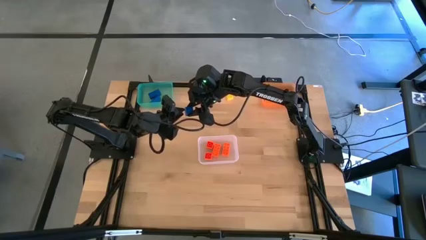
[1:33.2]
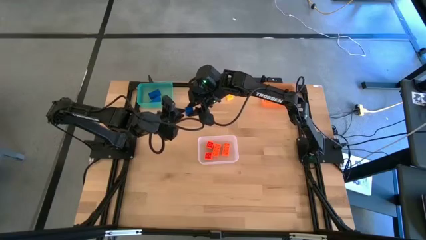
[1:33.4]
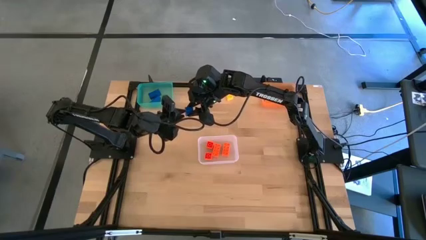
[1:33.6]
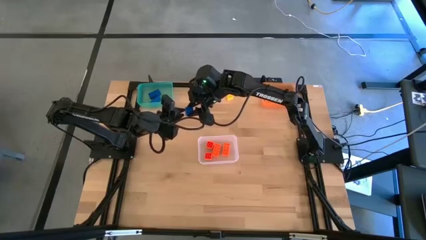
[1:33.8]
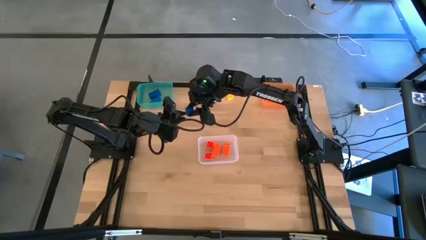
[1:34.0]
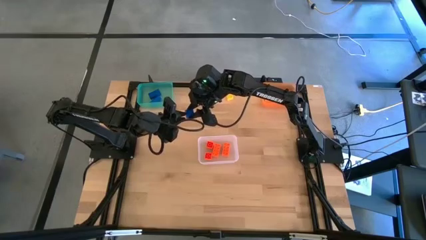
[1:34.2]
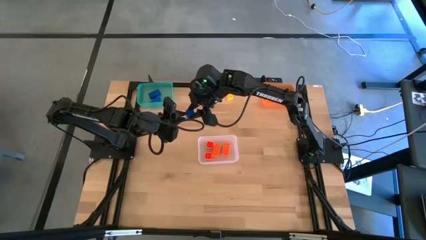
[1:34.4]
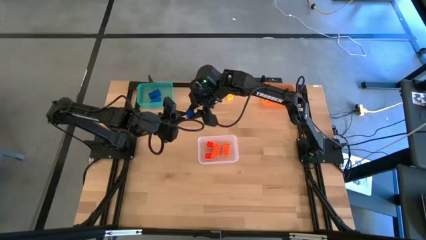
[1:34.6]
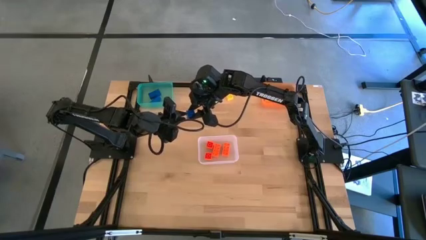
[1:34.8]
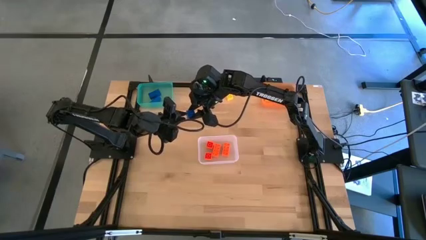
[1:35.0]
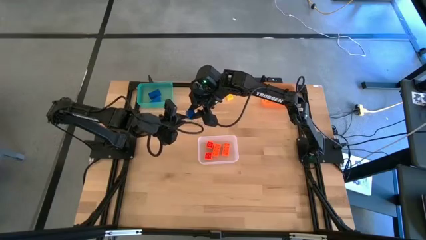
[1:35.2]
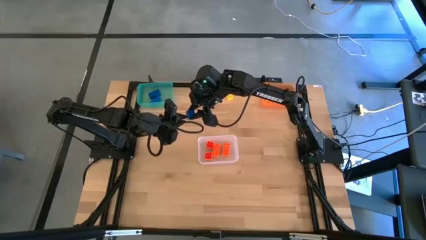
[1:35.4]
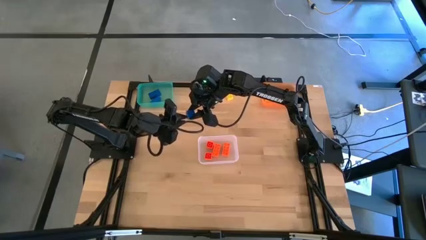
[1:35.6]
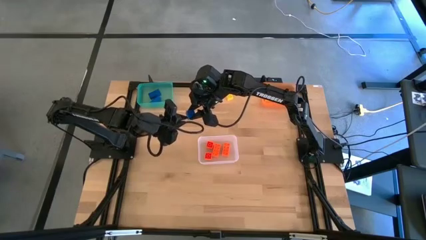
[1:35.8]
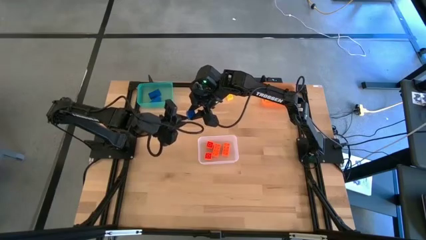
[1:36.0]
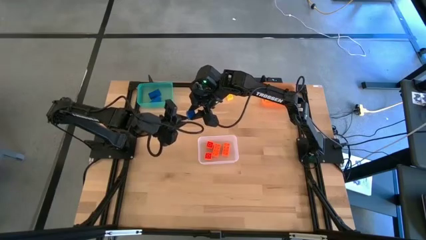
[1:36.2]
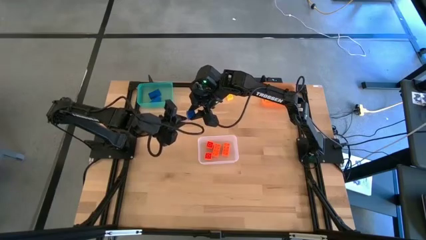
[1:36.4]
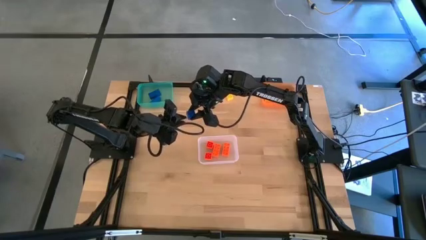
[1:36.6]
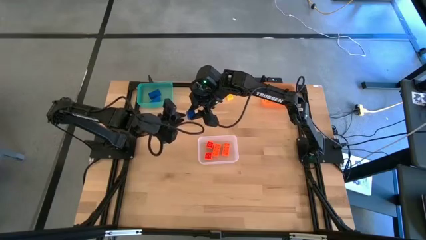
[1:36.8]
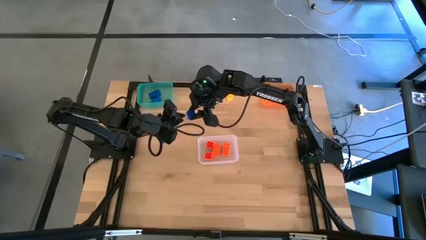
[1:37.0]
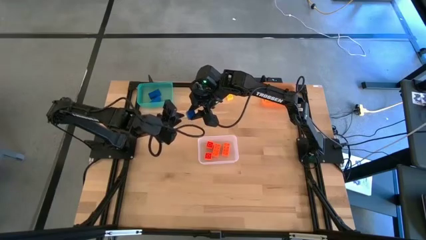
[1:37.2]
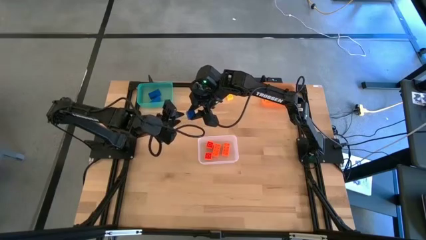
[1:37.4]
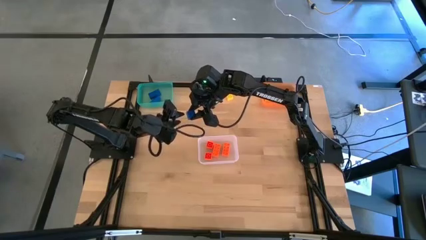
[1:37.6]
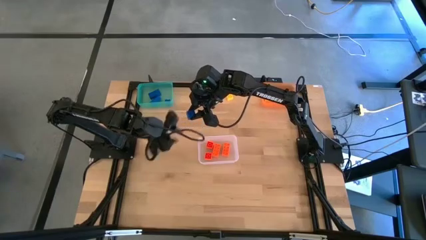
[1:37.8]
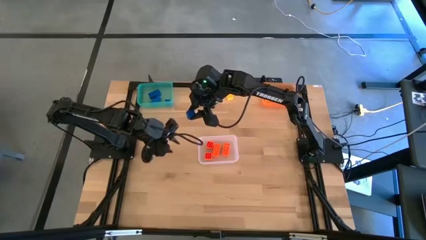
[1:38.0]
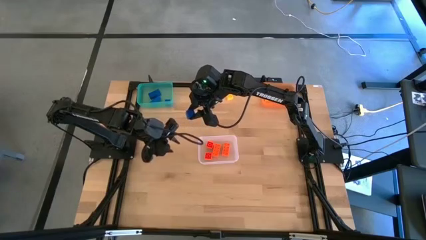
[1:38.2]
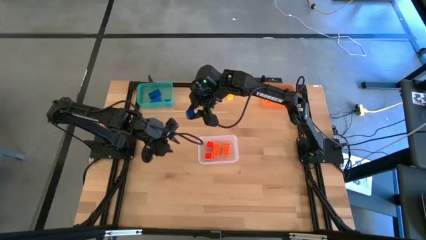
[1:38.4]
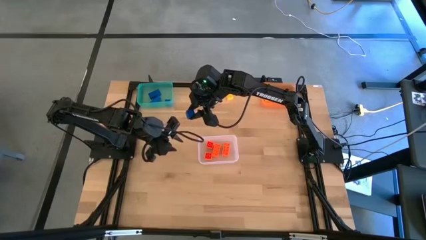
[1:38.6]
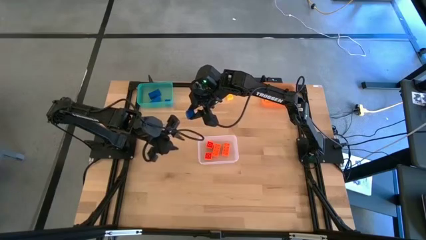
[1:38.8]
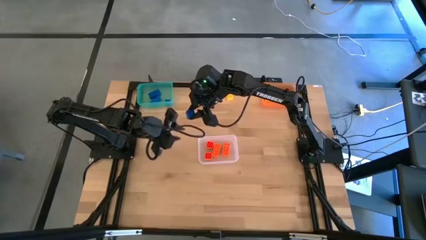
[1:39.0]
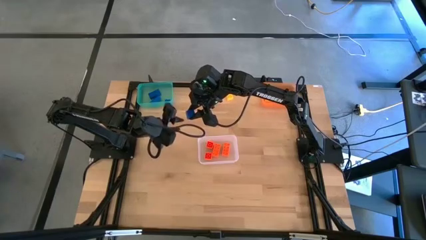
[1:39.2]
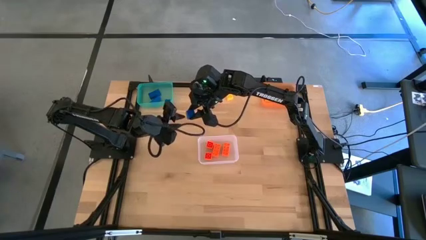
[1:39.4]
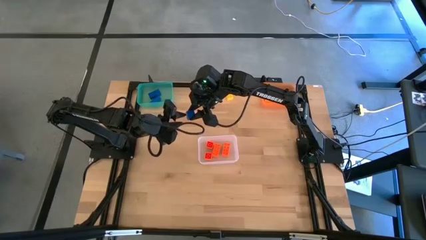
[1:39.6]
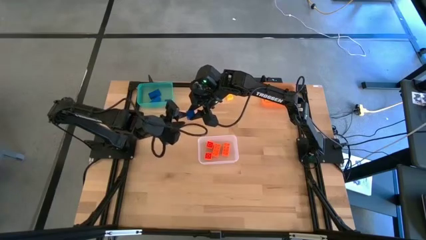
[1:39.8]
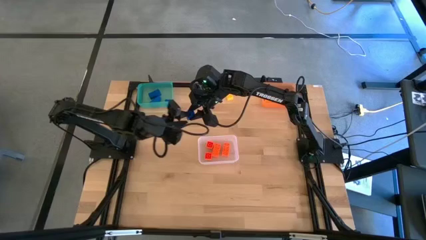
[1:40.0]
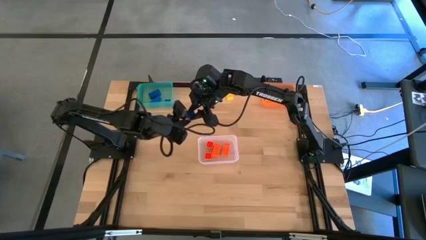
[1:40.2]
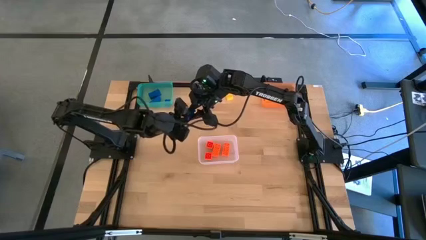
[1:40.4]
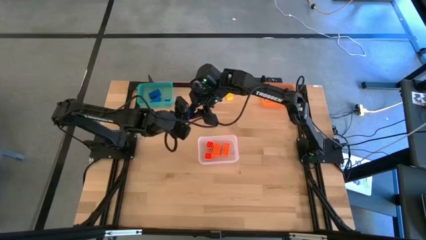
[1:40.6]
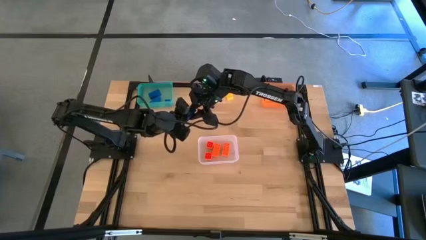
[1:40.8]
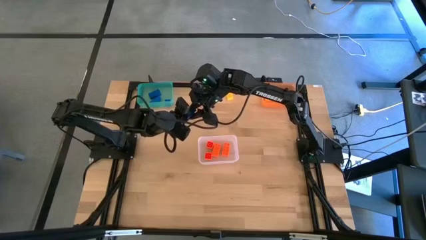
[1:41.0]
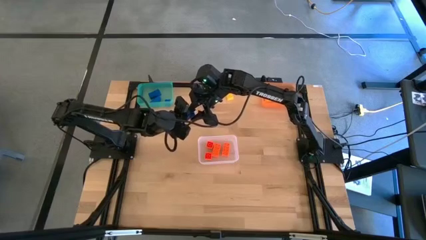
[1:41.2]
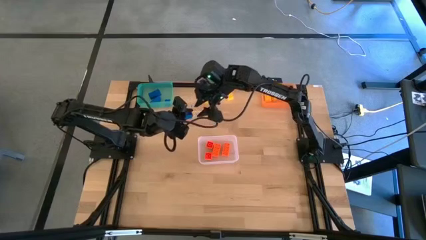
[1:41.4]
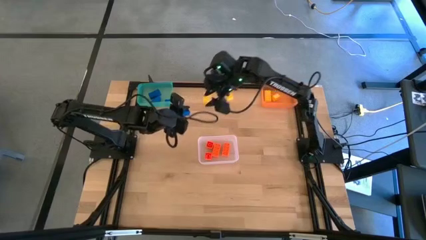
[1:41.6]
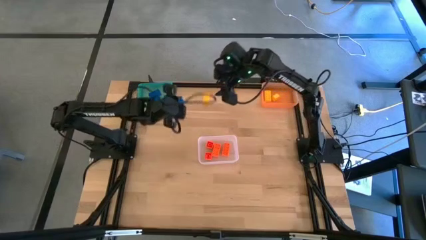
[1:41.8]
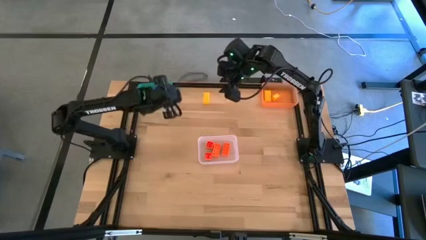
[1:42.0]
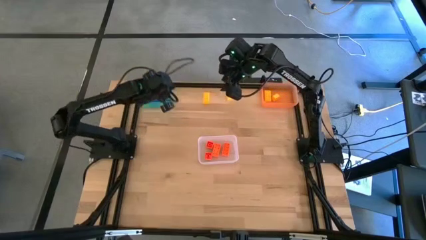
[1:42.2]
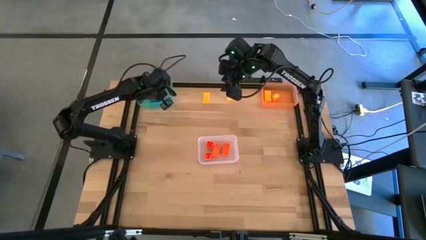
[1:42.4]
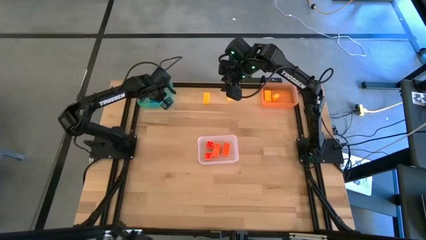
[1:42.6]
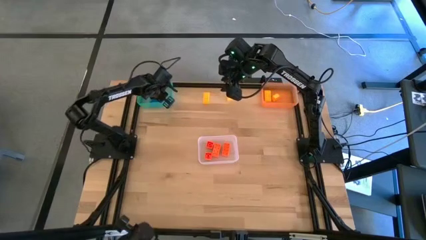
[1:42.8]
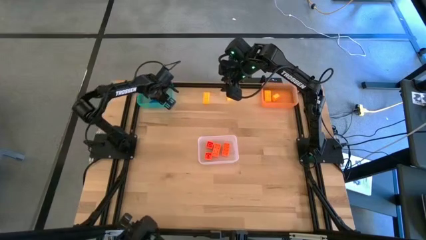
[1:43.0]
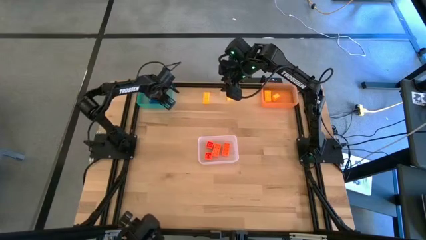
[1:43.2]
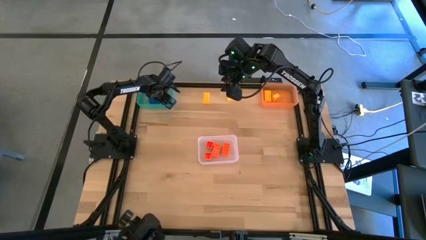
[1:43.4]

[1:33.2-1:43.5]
Task: Sort & place blocks by color
Put the blue game piece into the blue bin

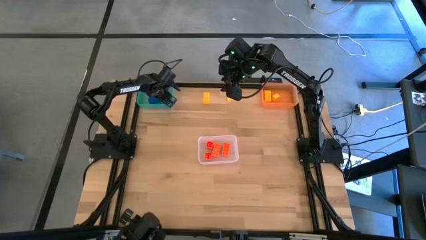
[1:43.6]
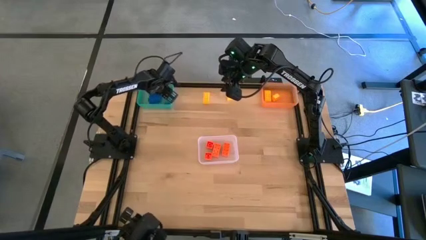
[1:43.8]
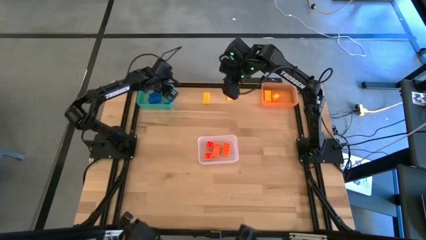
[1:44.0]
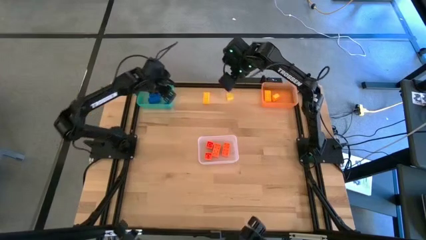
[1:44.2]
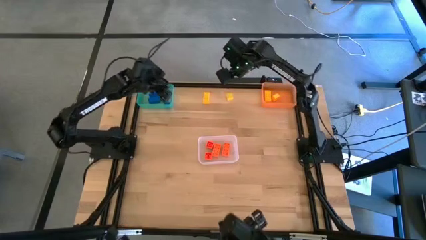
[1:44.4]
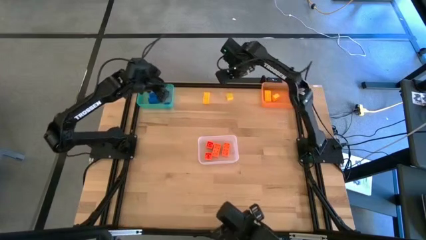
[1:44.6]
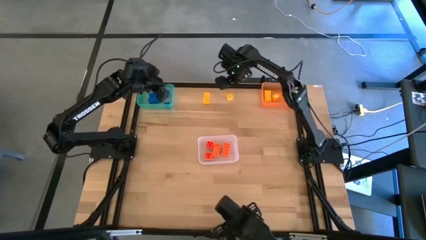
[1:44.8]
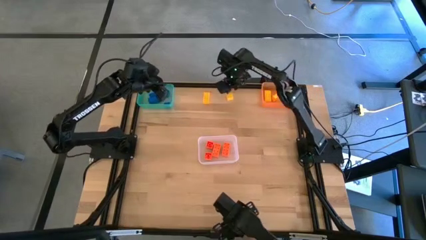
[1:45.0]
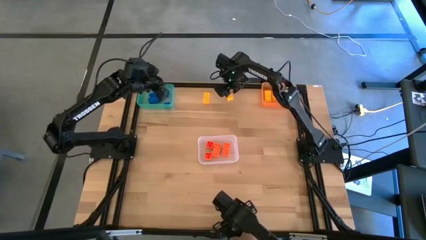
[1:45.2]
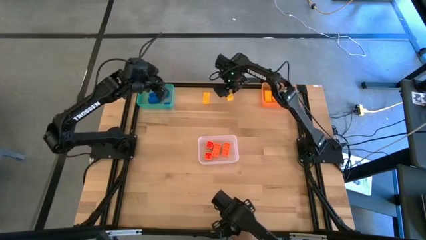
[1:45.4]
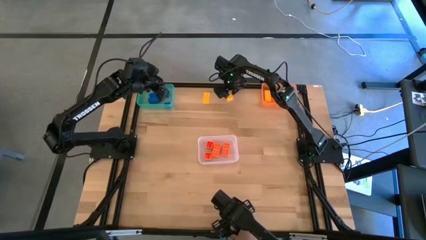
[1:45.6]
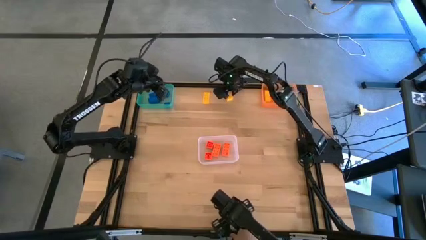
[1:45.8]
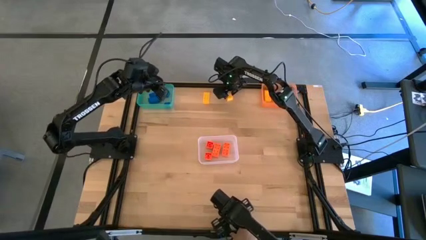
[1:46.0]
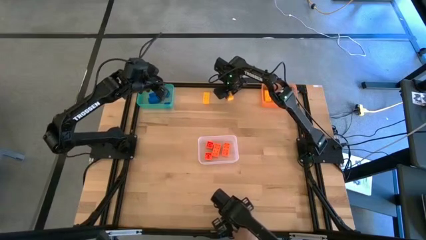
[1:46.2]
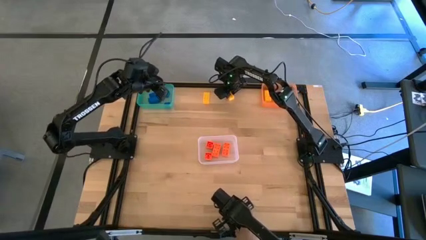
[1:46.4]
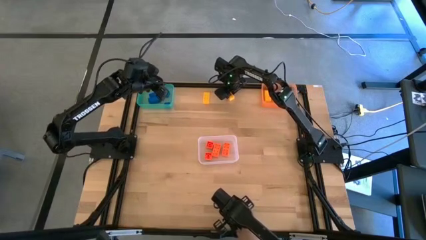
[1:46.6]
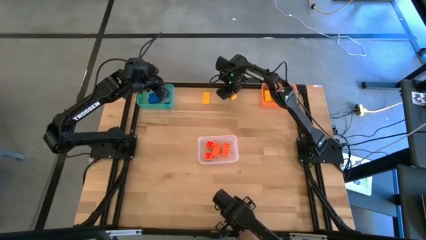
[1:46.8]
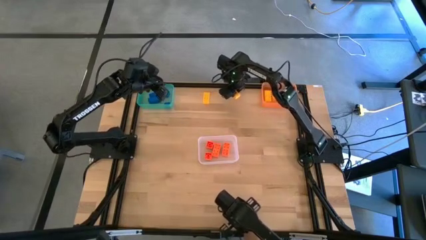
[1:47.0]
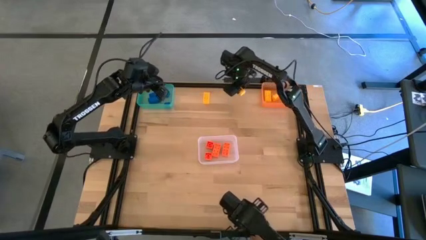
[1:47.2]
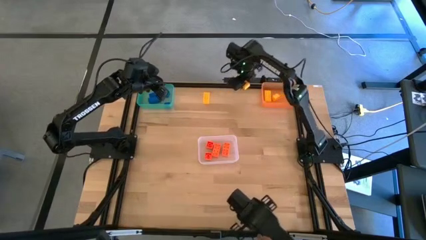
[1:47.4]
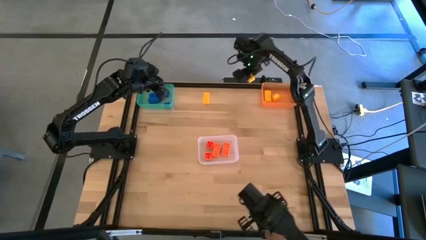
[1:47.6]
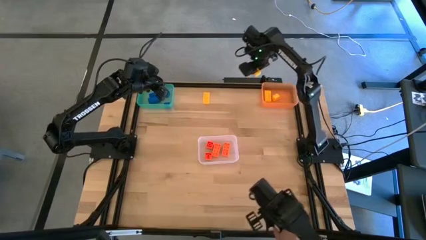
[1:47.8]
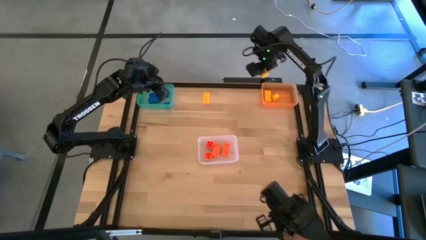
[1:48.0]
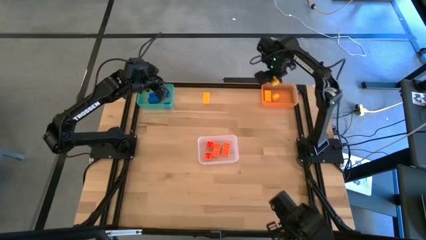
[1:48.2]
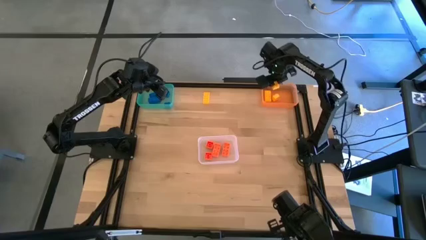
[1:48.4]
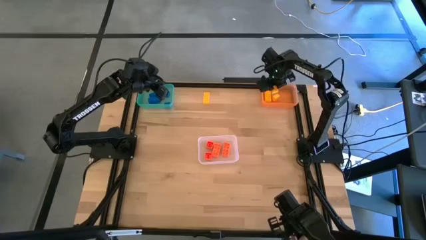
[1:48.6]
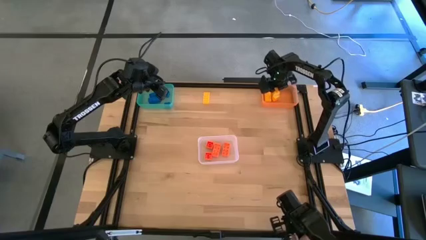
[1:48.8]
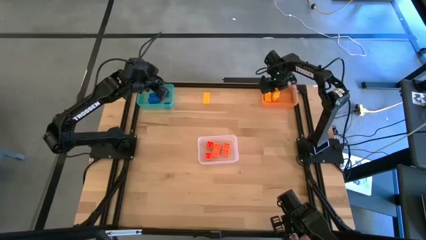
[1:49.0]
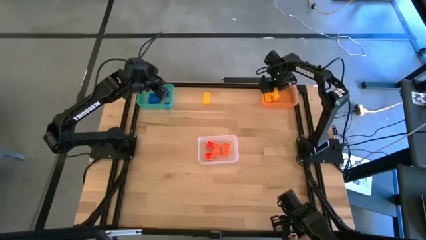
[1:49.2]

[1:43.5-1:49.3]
Put the right yellow game piece into the orange bin
